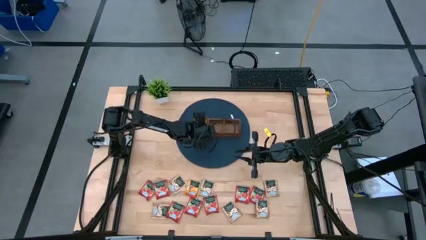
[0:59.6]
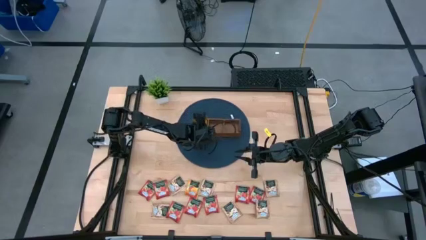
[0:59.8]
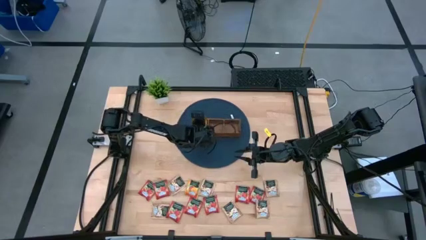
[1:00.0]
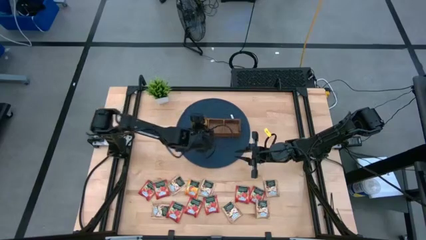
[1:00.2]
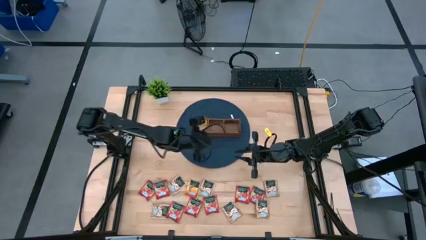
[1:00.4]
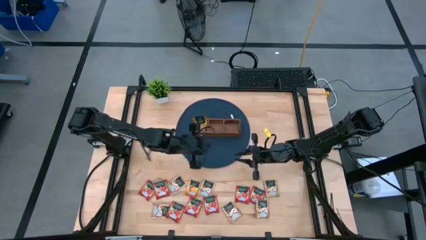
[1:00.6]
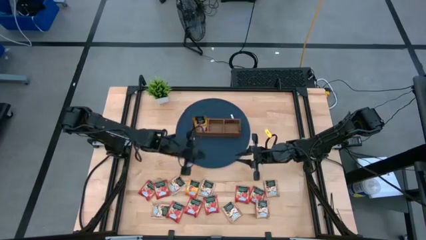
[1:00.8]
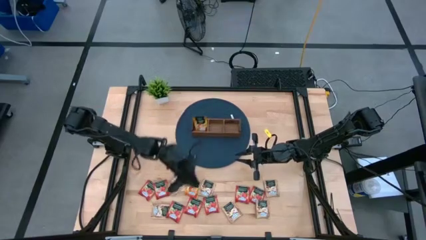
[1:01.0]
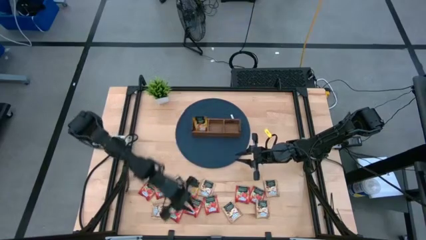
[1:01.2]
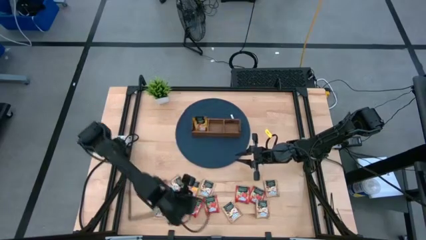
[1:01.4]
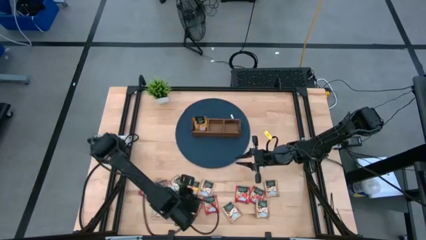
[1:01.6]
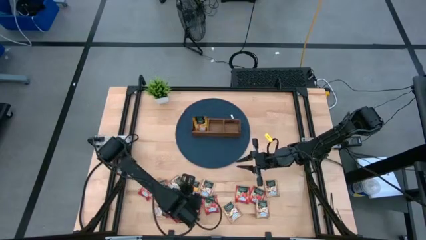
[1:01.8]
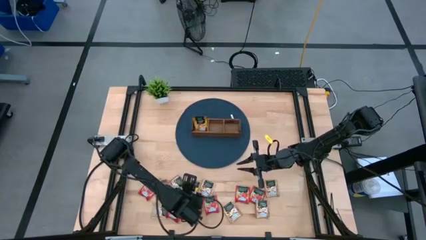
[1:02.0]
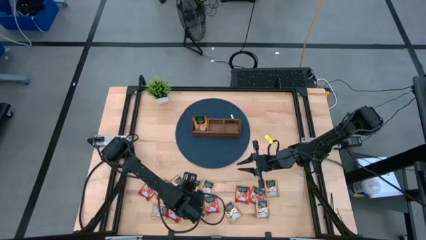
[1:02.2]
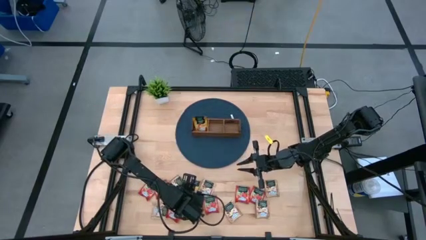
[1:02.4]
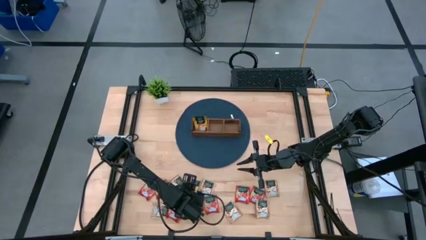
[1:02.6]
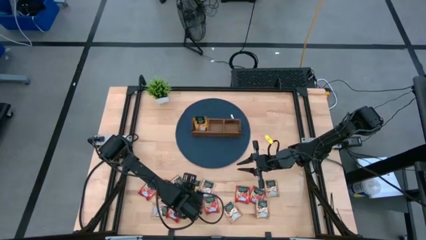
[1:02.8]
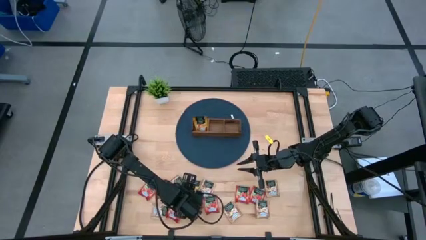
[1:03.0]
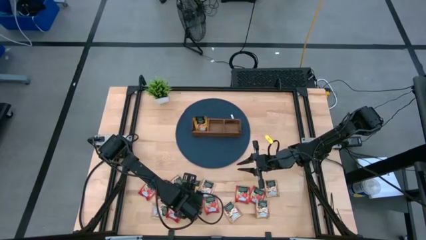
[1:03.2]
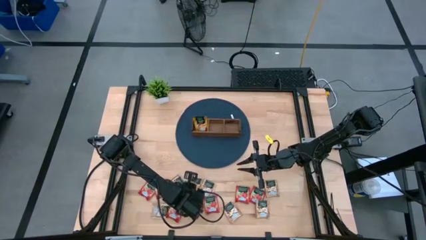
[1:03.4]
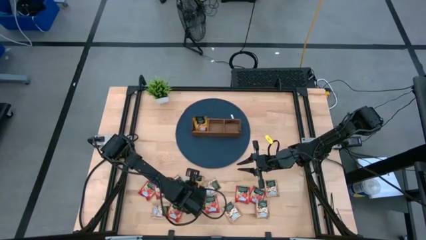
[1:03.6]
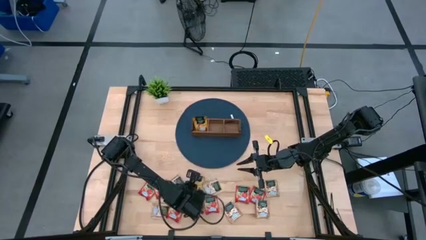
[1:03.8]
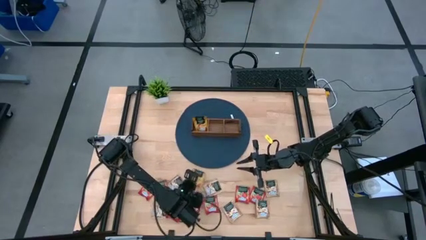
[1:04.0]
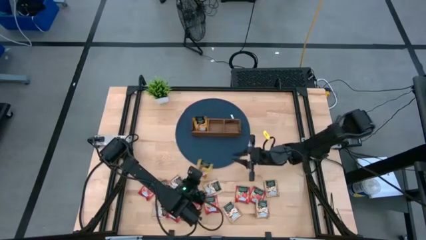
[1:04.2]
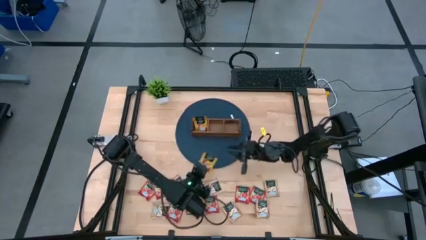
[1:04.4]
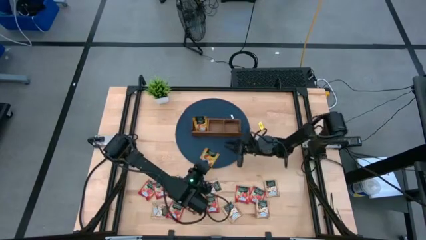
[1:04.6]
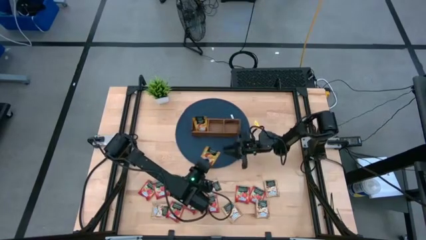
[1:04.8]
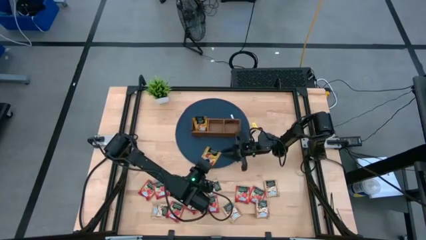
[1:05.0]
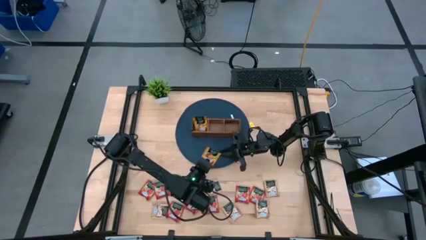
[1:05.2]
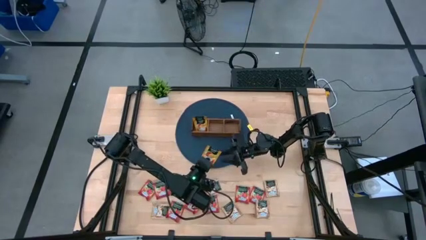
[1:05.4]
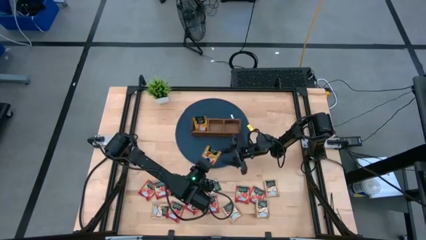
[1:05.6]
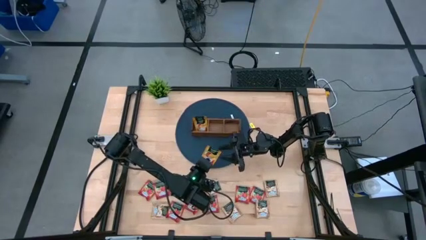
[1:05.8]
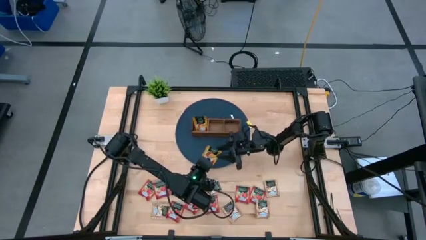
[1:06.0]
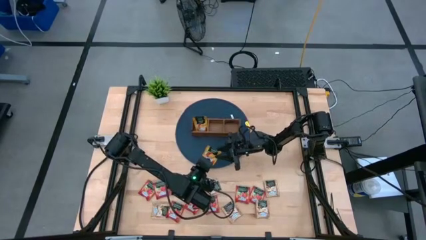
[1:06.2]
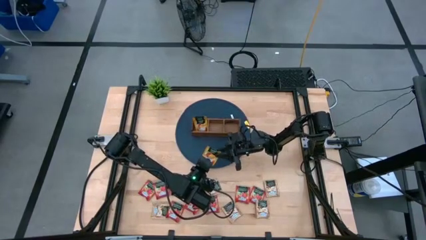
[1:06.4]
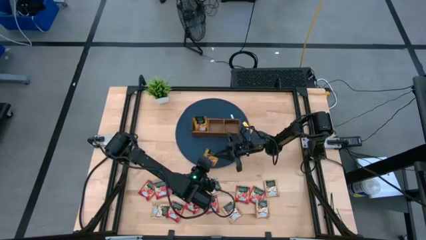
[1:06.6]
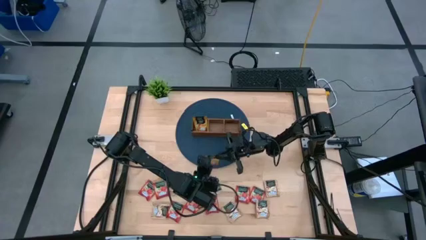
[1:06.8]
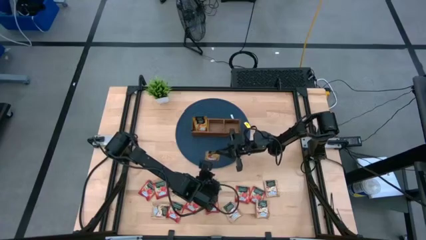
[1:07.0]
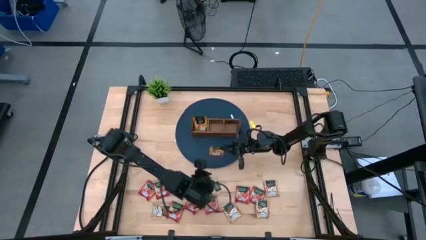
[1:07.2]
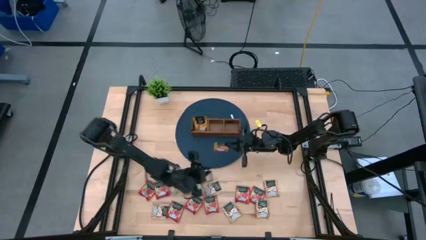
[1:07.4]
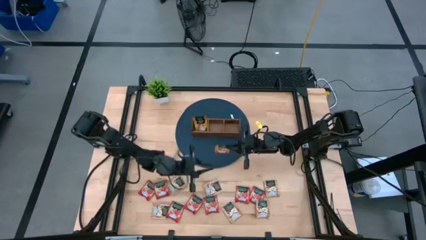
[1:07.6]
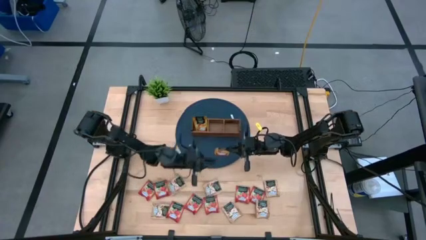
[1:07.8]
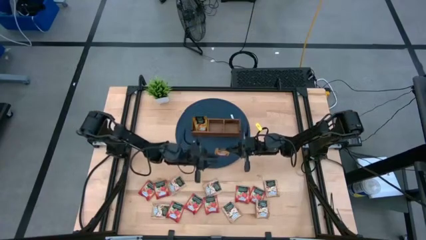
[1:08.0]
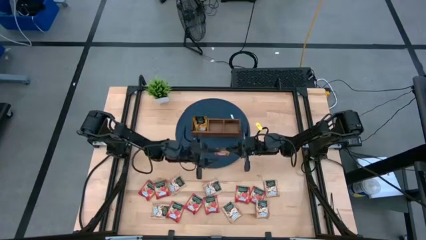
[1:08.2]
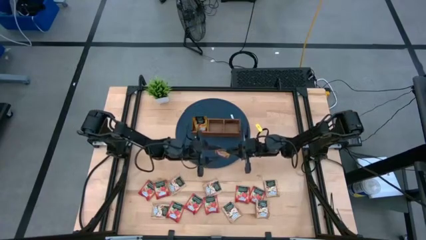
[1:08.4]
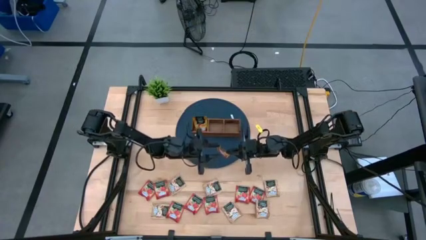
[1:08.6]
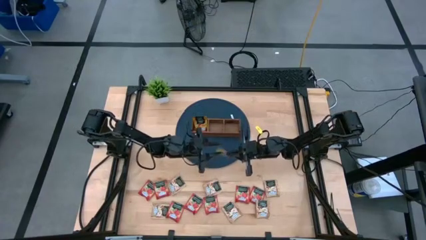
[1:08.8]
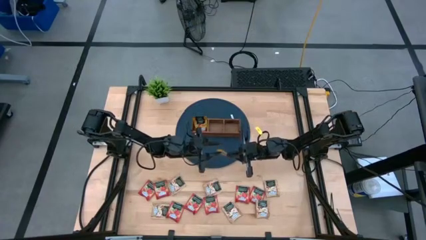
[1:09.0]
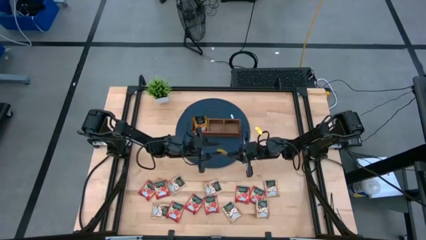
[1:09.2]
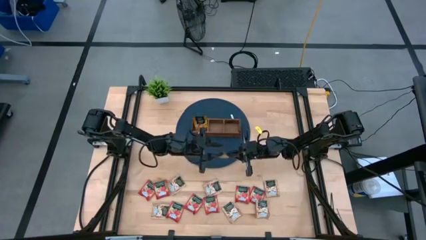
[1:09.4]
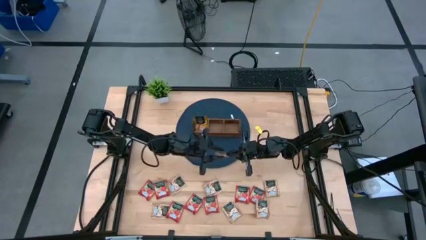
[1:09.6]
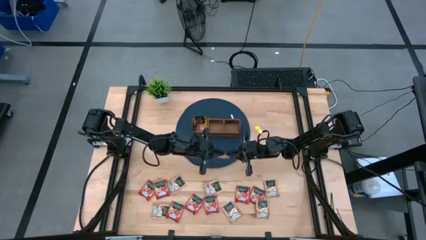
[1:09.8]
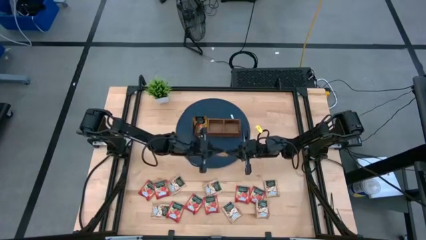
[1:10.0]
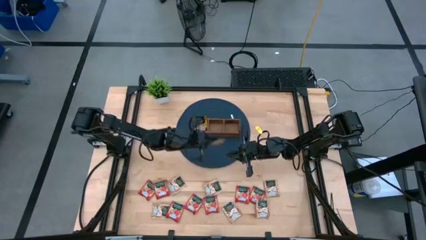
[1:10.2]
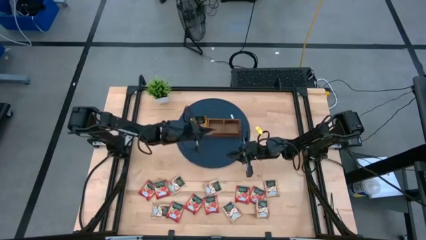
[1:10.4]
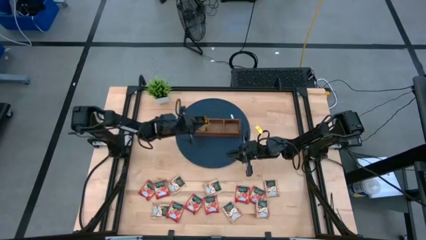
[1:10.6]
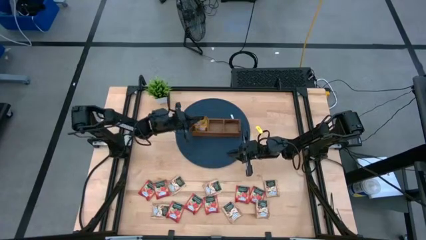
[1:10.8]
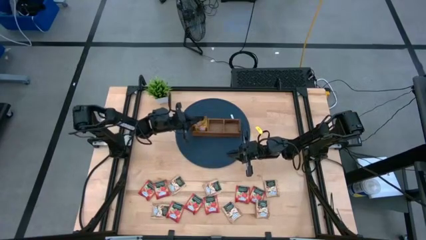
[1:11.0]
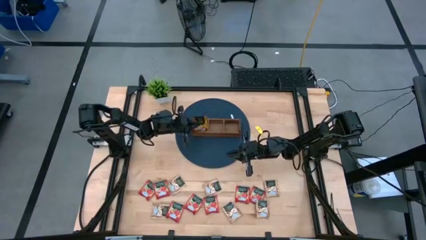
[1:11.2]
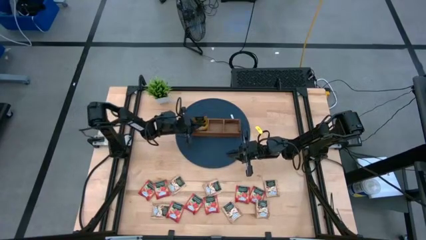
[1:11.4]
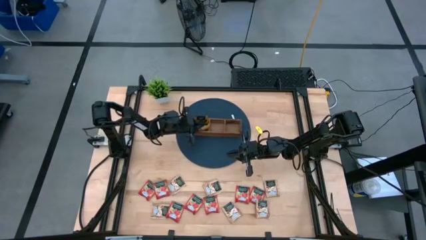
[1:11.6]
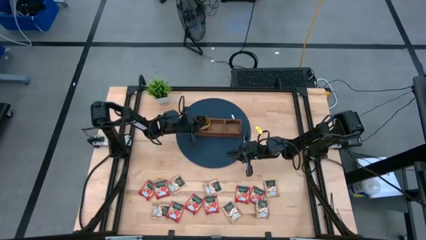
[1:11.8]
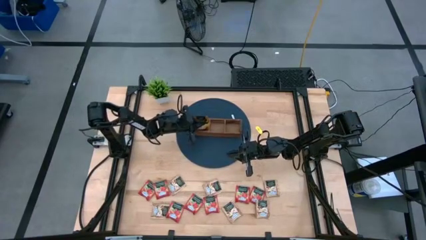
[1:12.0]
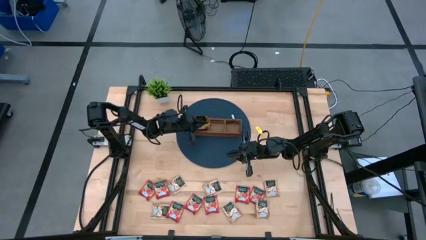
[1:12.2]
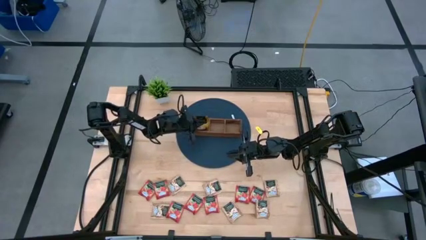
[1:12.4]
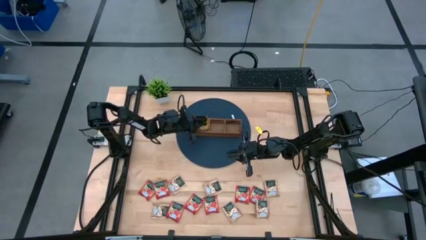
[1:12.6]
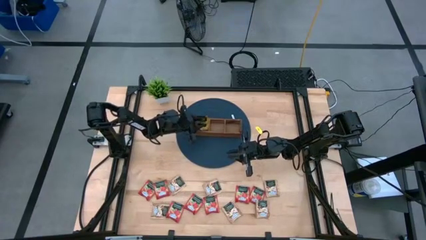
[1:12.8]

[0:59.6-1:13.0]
Task: Pick & Place Tea
Put the yellow tea bag into the left section of the wooden organizer
